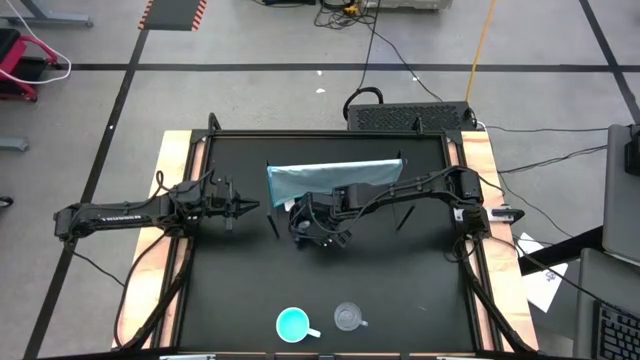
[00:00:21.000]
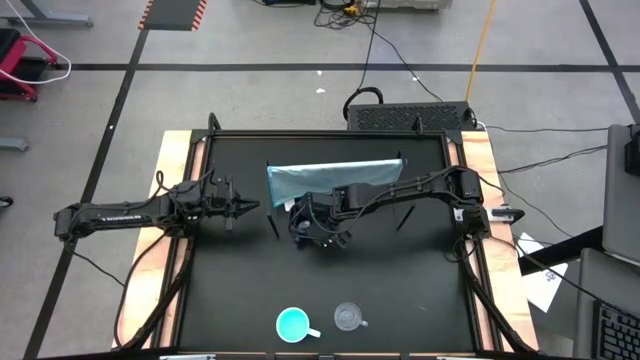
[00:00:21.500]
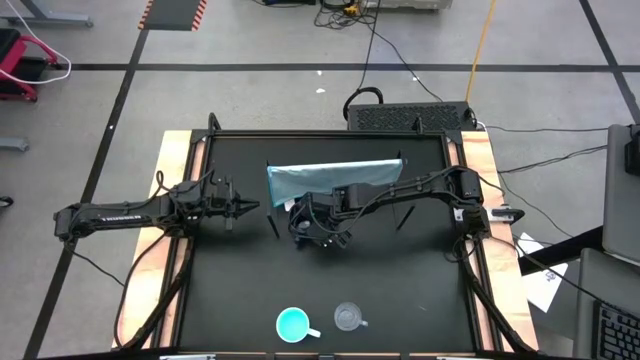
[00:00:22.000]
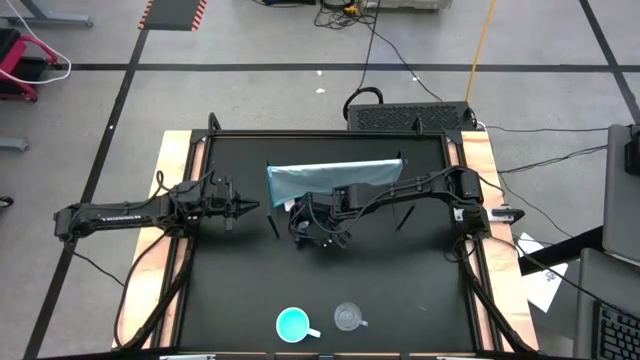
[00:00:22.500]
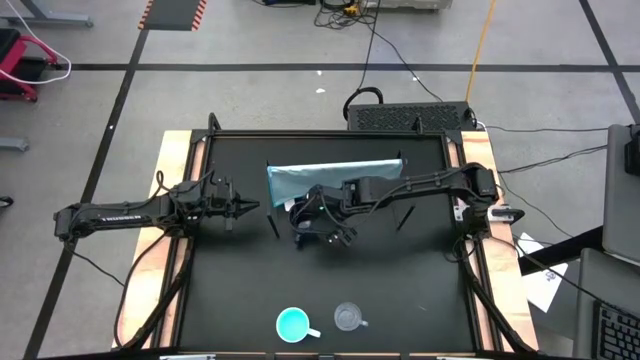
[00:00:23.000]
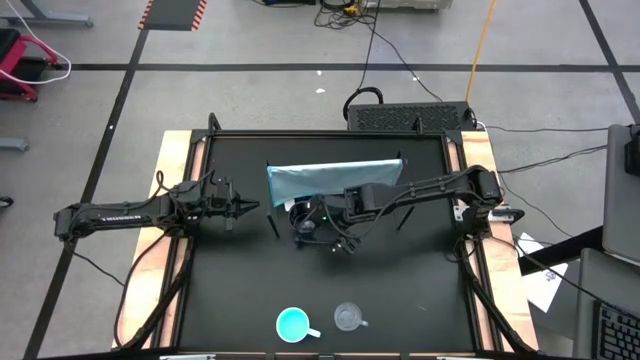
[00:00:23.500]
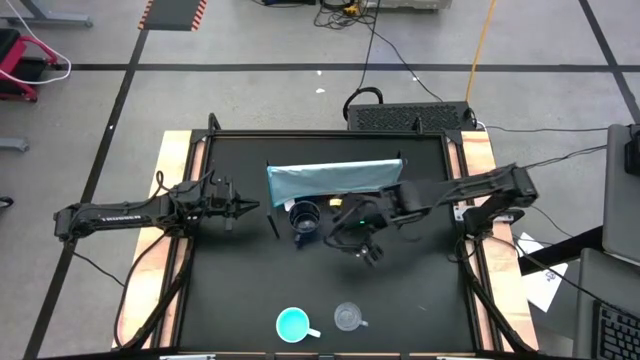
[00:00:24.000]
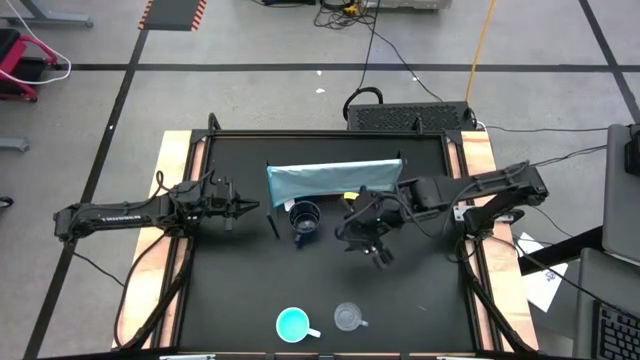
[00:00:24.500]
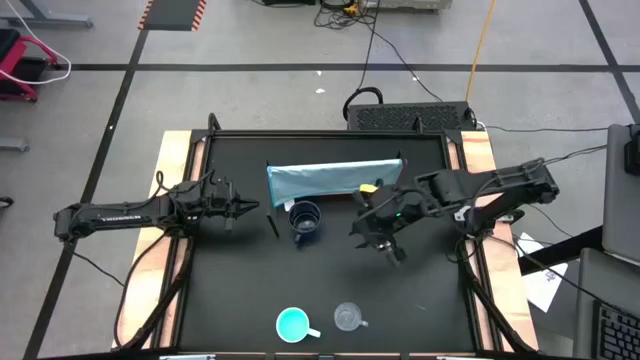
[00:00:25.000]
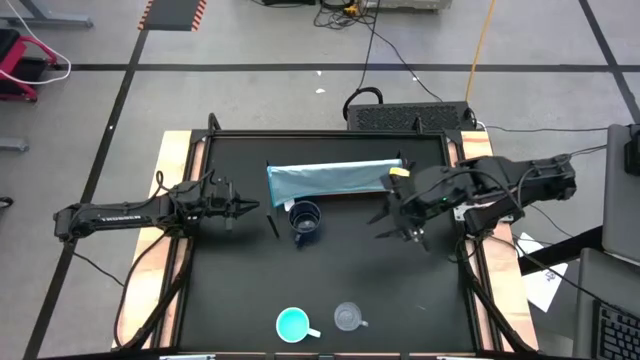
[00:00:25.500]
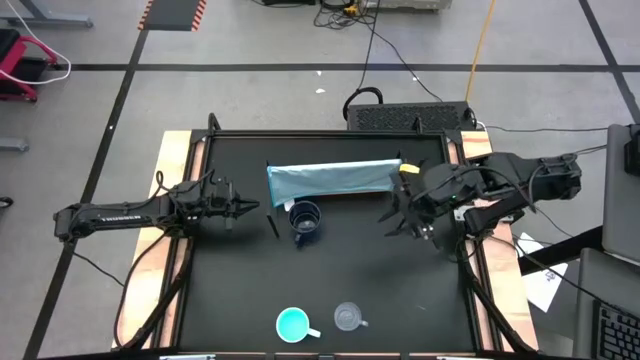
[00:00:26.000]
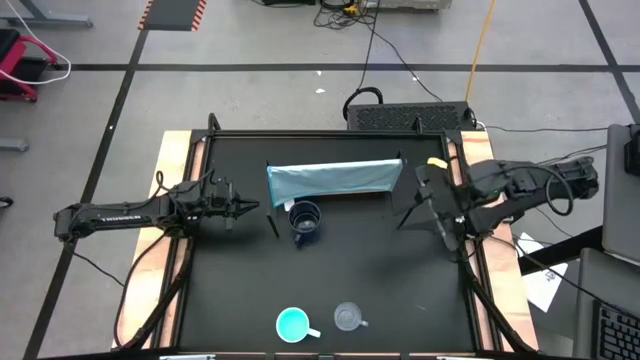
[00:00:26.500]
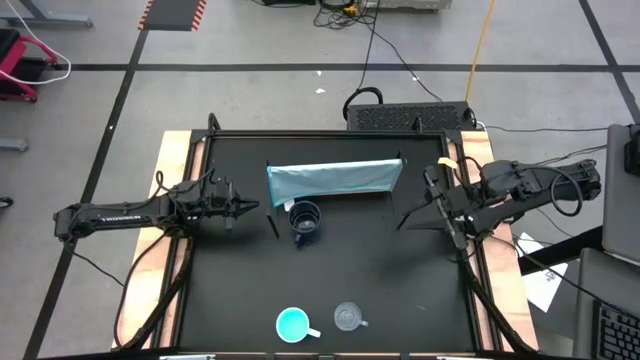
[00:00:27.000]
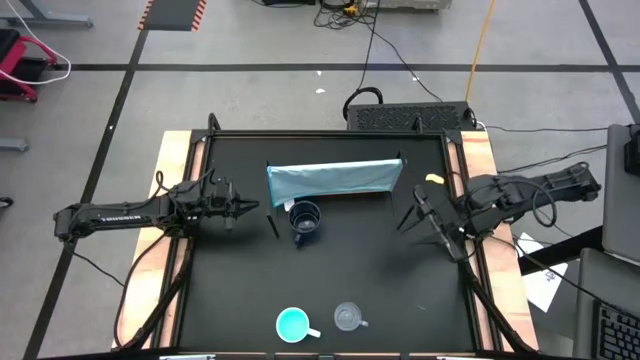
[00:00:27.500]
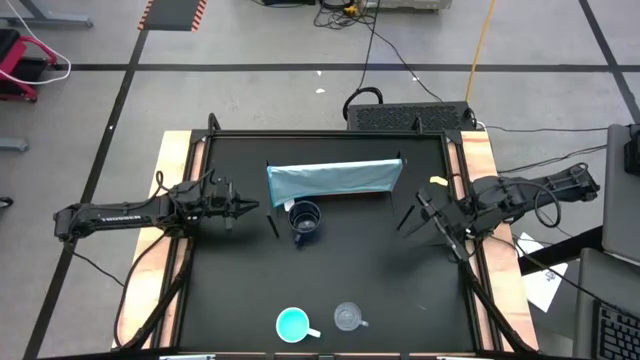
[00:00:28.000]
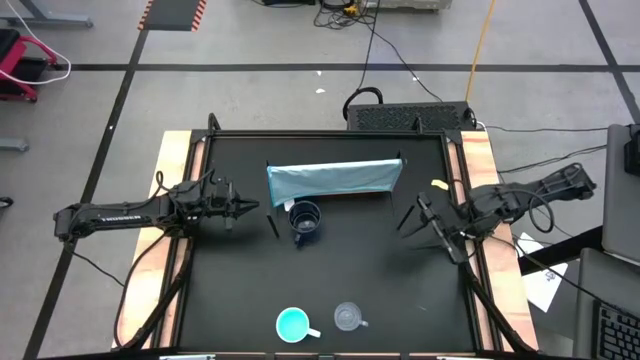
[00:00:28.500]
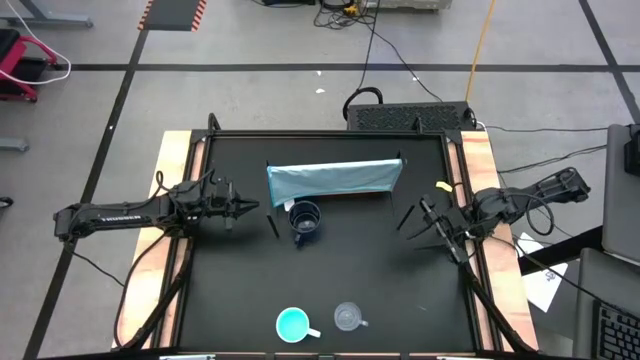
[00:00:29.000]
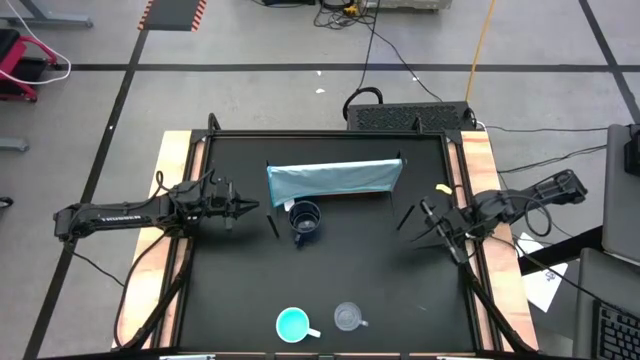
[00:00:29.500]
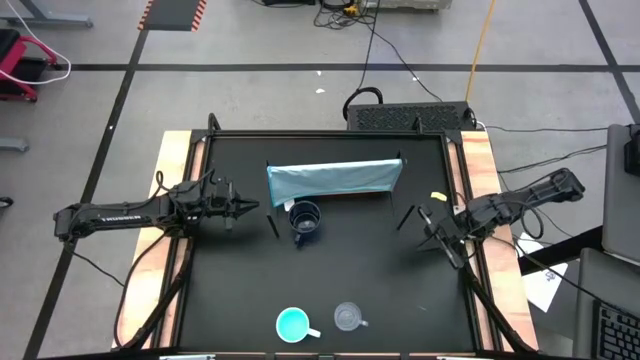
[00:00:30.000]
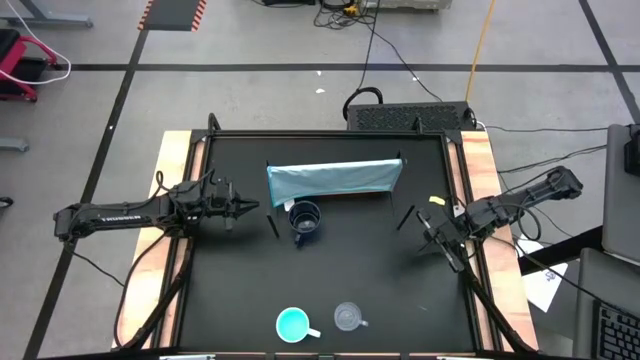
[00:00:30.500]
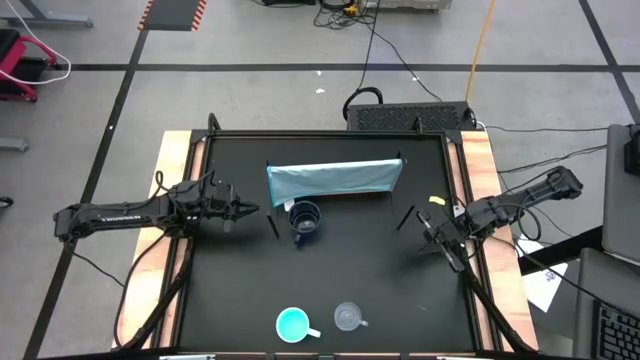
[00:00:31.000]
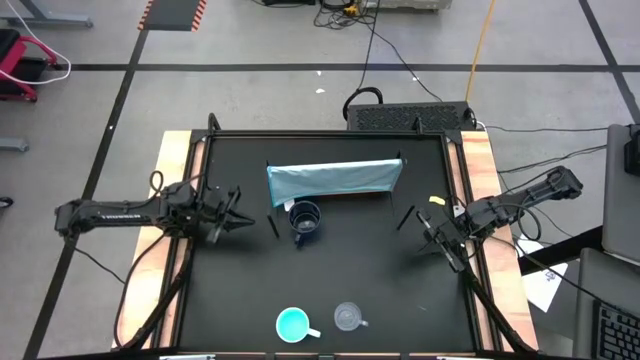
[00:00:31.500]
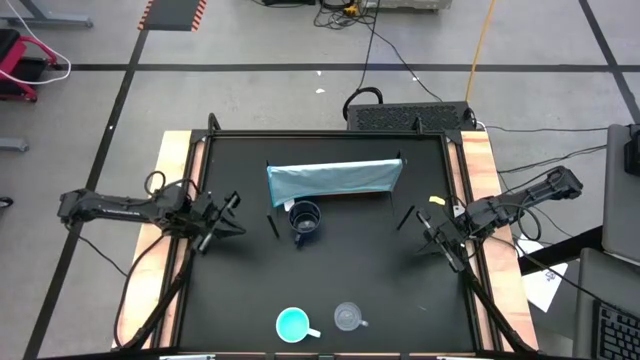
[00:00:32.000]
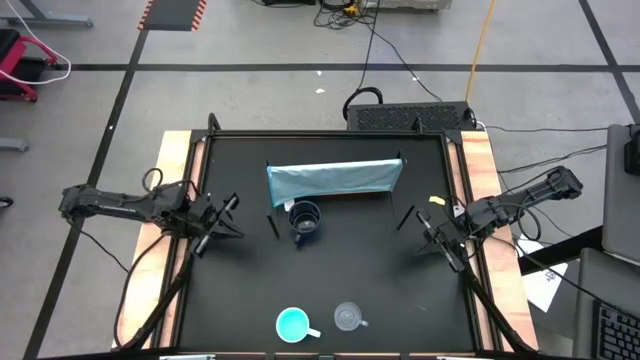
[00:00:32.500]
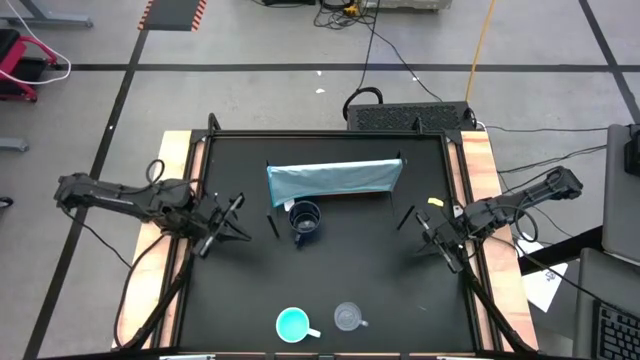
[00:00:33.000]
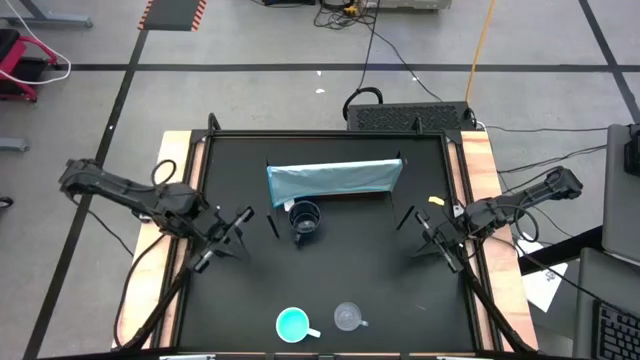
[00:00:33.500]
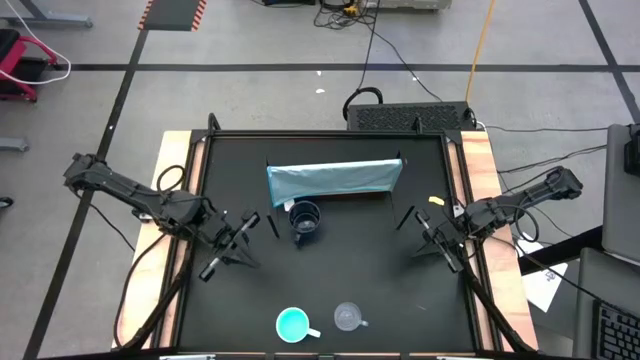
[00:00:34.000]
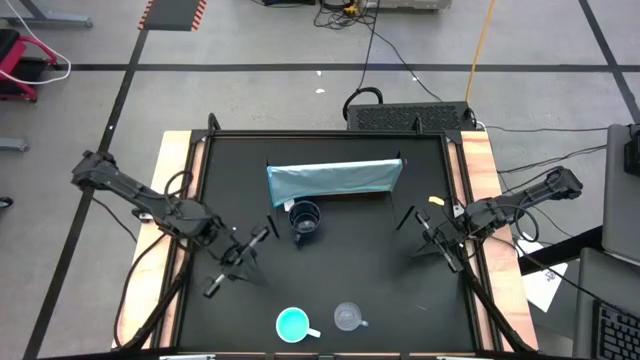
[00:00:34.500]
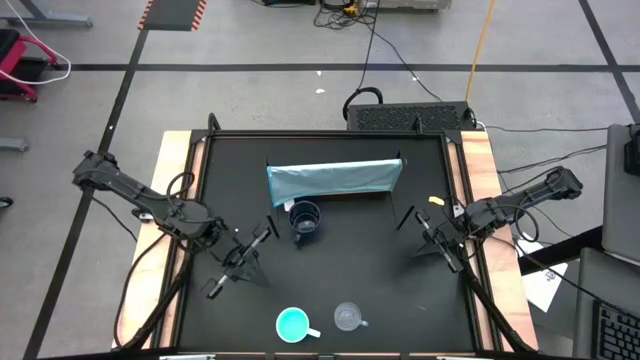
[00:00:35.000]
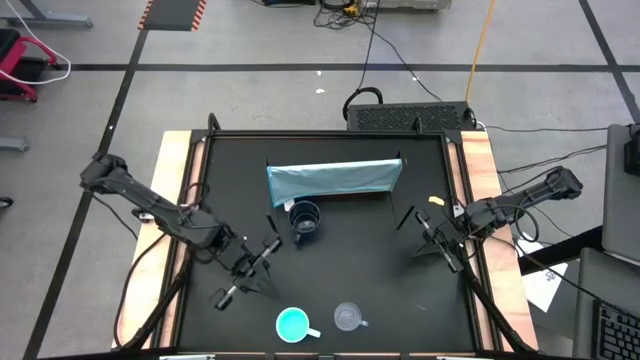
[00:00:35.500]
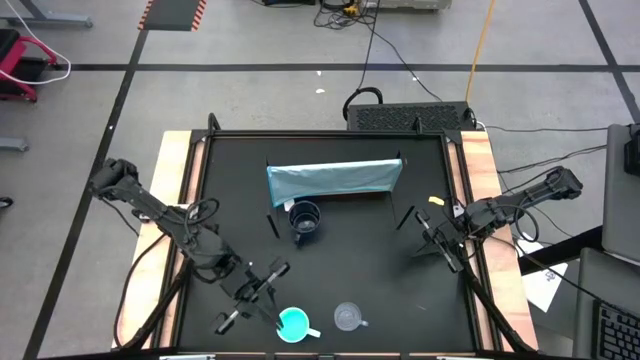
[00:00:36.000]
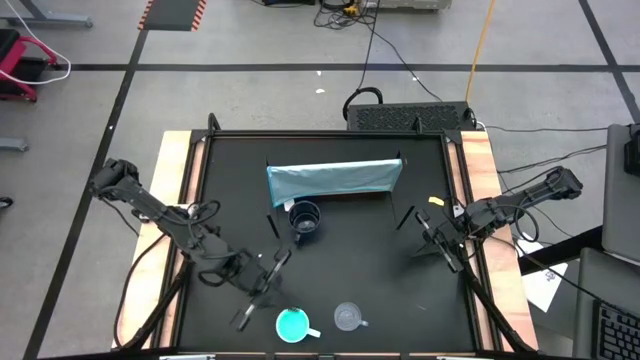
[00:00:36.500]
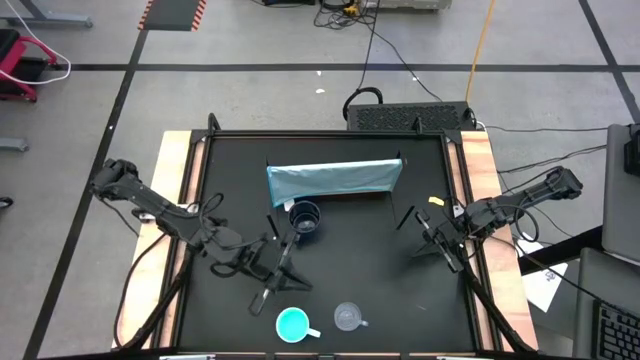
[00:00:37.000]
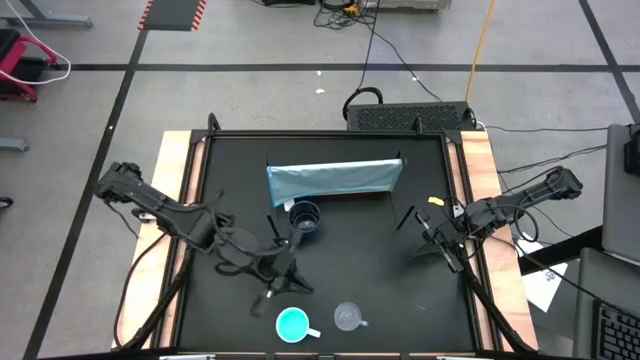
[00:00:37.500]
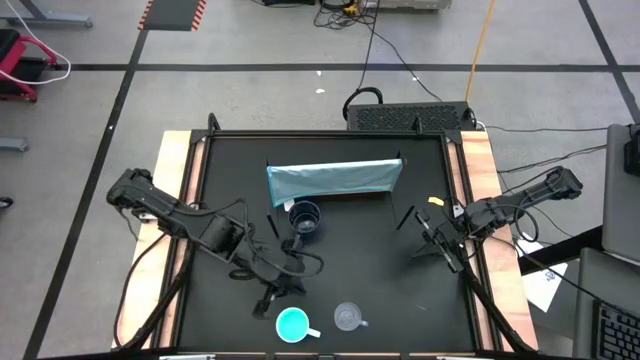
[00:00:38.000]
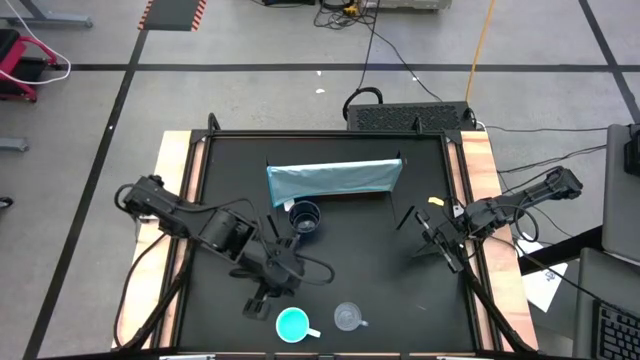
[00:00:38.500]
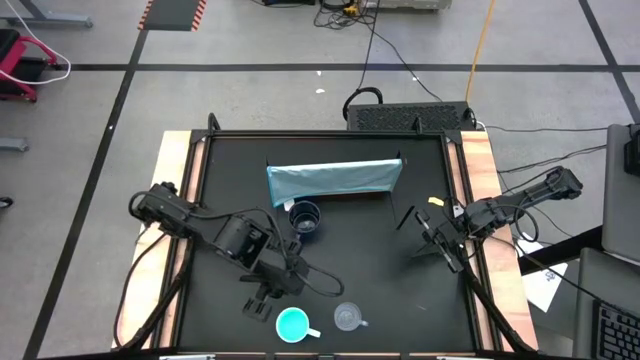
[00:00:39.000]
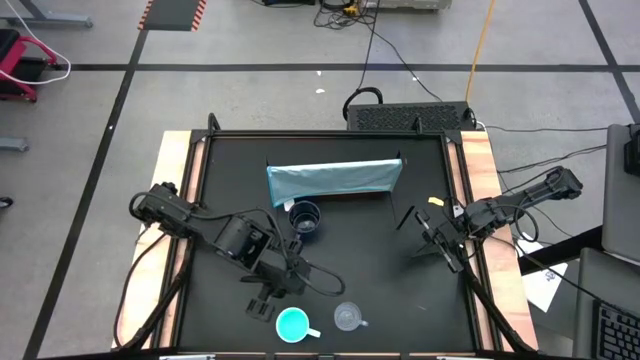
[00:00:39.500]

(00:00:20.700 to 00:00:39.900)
Task: Stack small to large cups/mugs on shelf
Move the light blue mug to the center of the table
